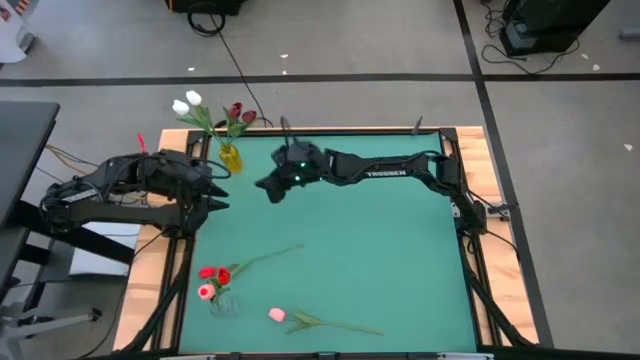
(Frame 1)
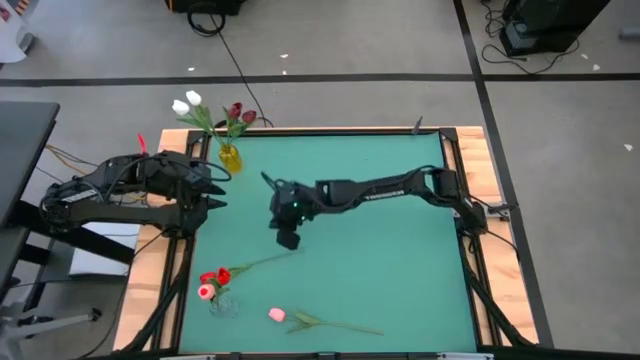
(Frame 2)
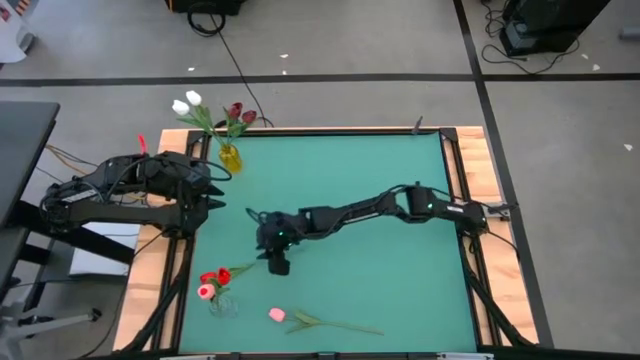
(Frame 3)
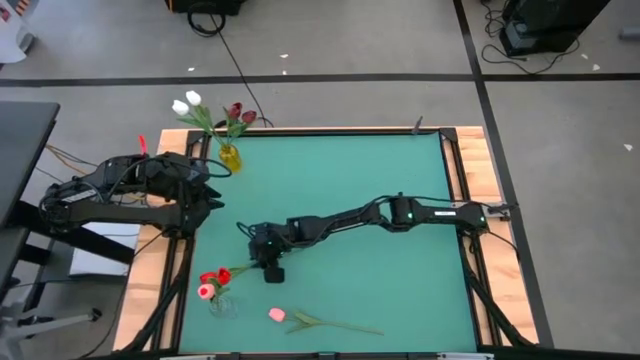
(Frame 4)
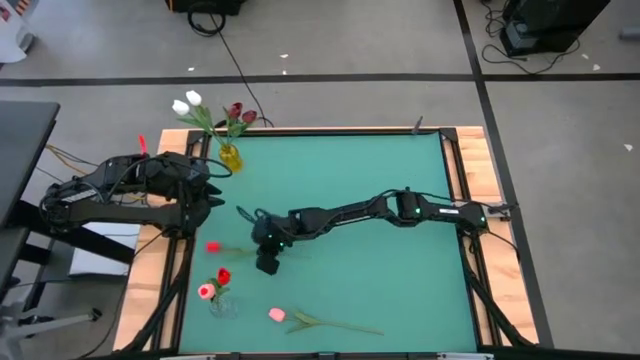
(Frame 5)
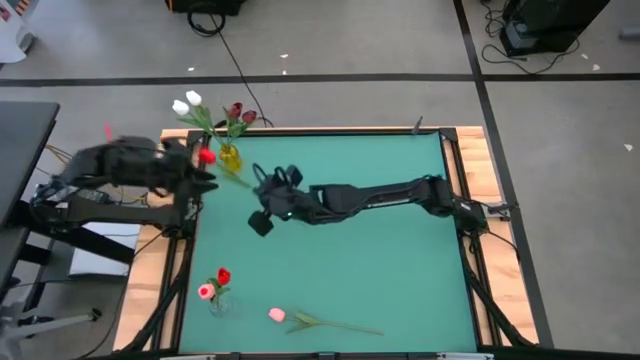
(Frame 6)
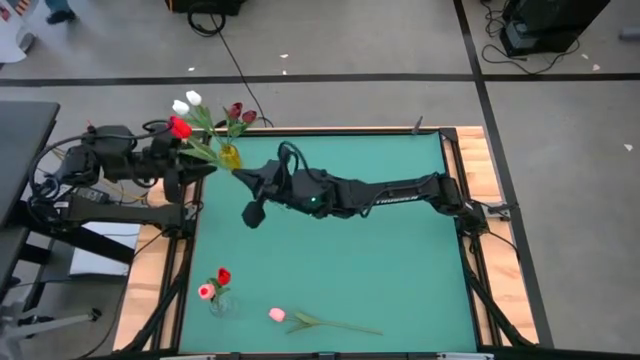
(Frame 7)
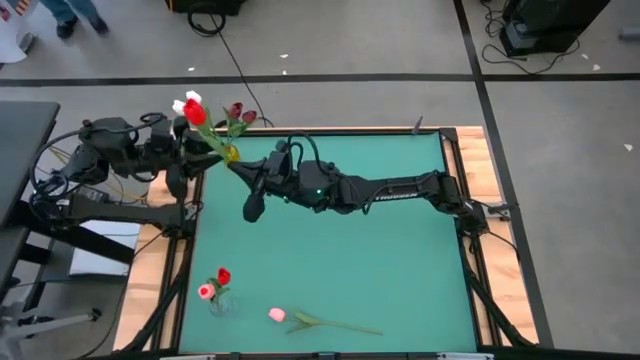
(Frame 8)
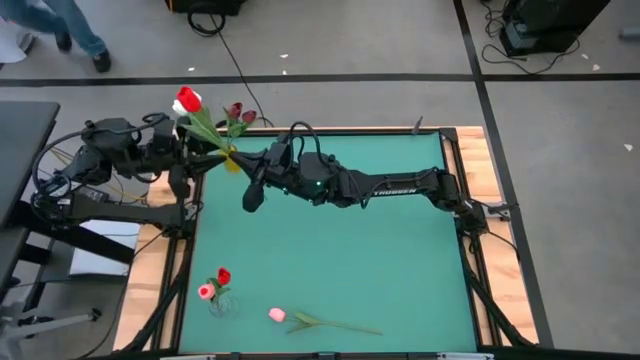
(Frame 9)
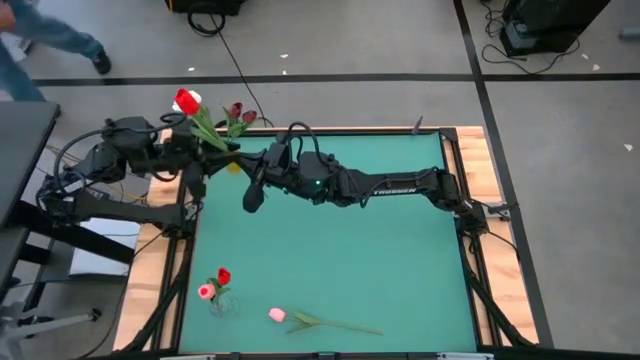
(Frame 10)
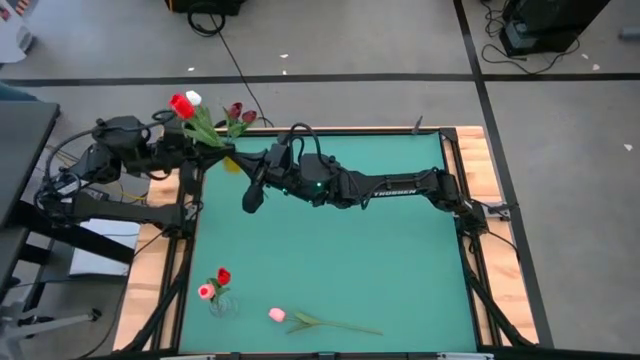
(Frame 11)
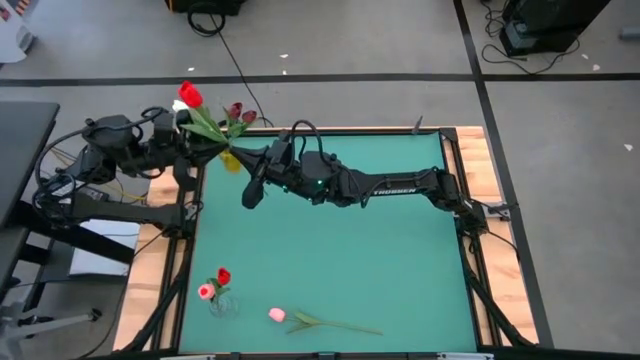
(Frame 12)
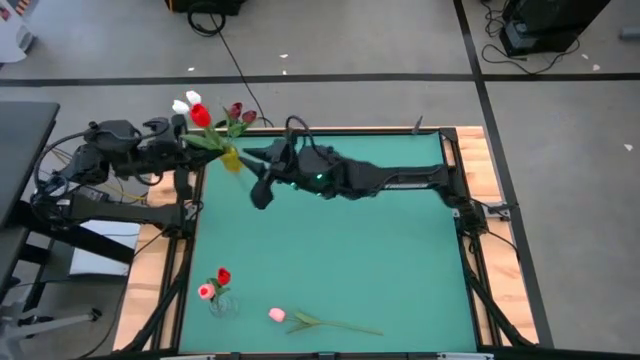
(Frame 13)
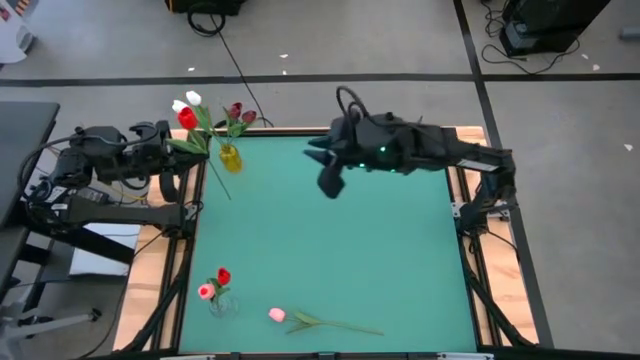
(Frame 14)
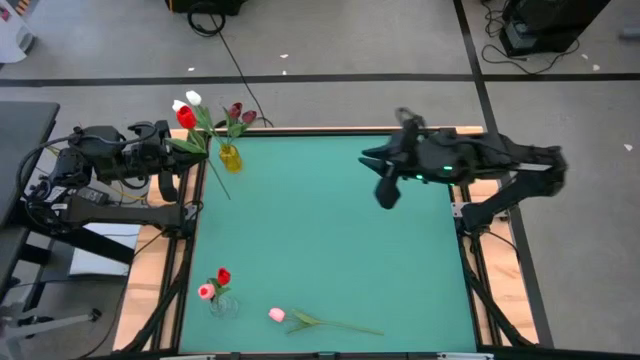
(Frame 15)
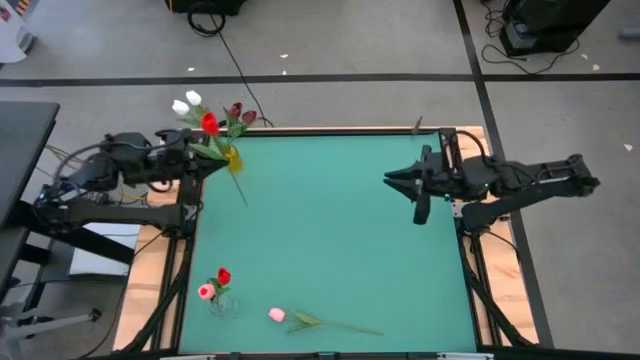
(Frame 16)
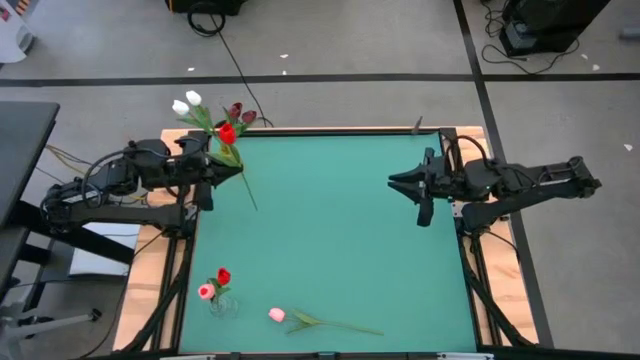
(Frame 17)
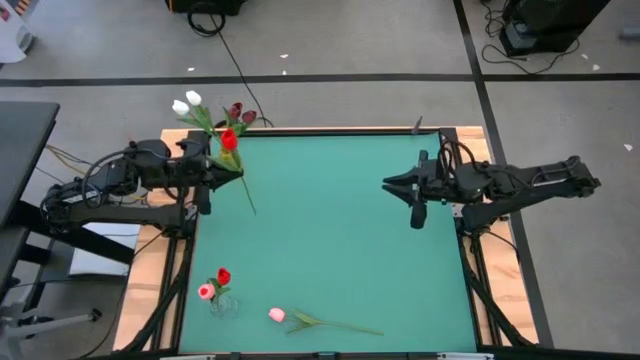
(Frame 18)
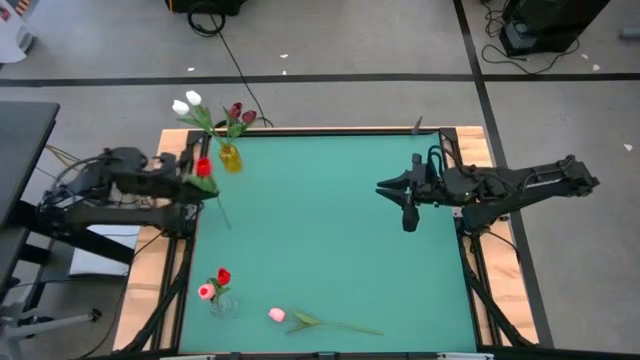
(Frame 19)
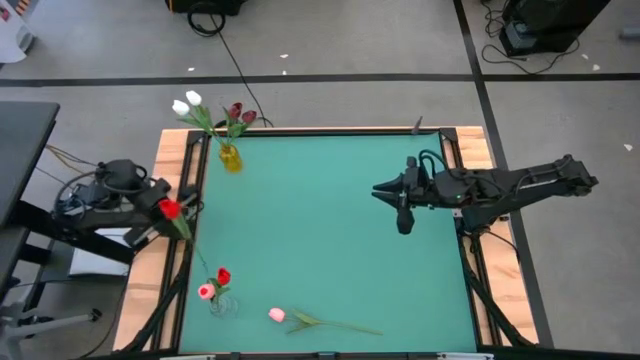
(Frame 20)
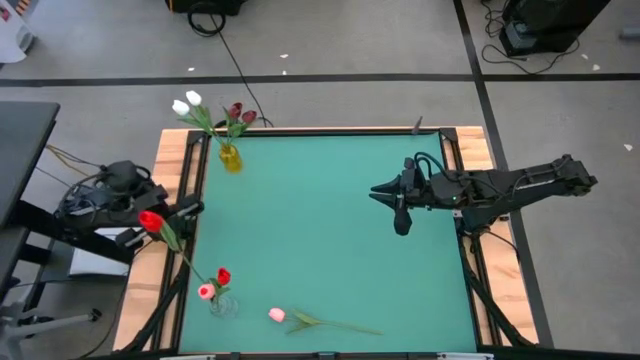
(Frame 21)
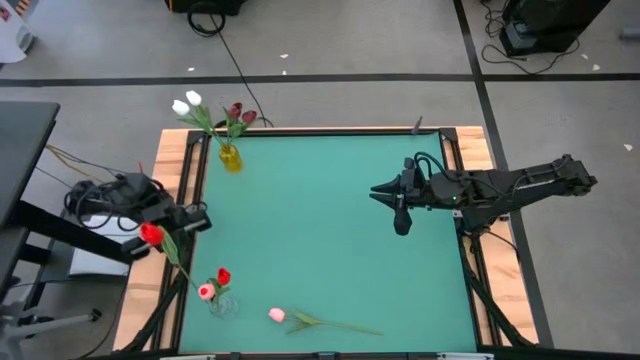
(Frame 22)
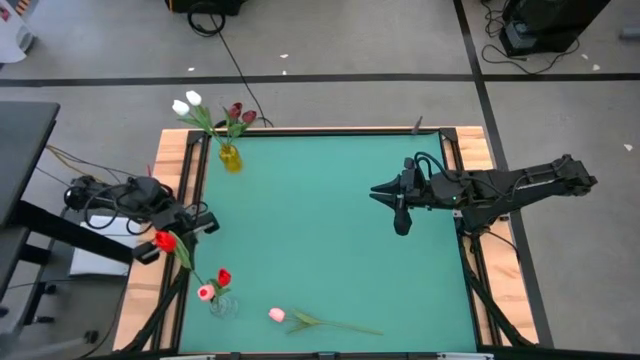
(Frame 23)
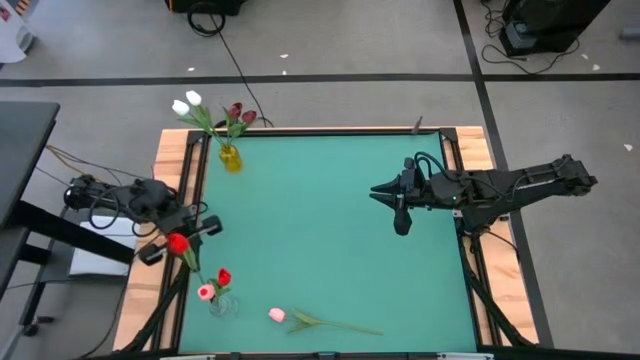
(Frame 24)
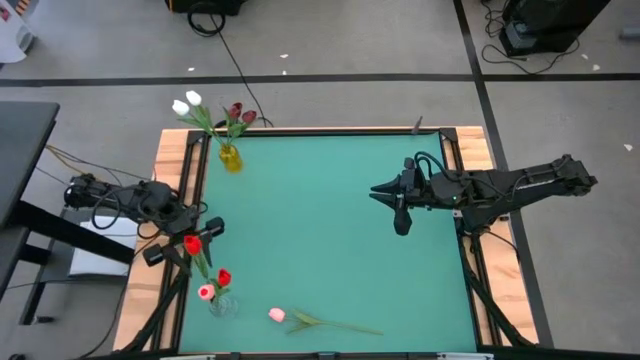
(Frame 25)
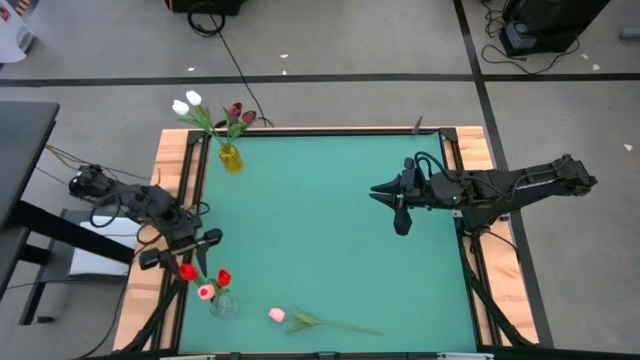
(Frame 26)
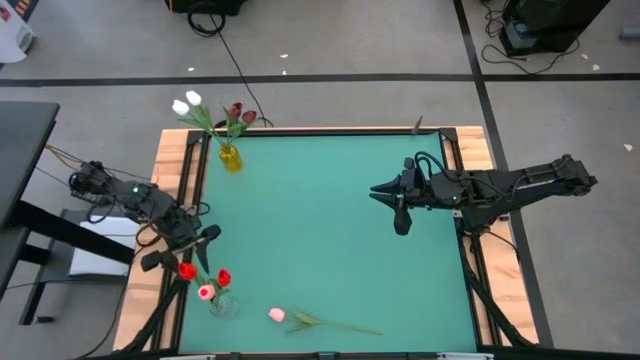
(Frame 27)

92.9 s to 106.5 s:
Task: Sort flowers into vase by color
Put the red flower into the transparent vase

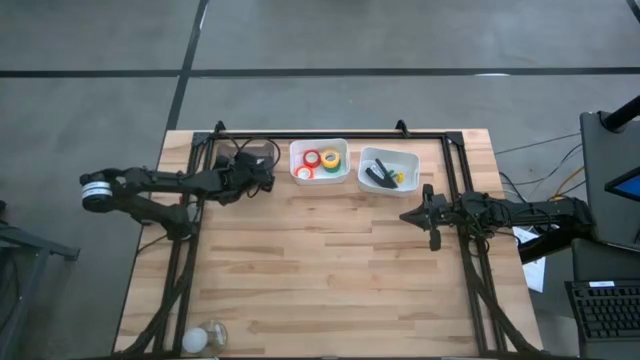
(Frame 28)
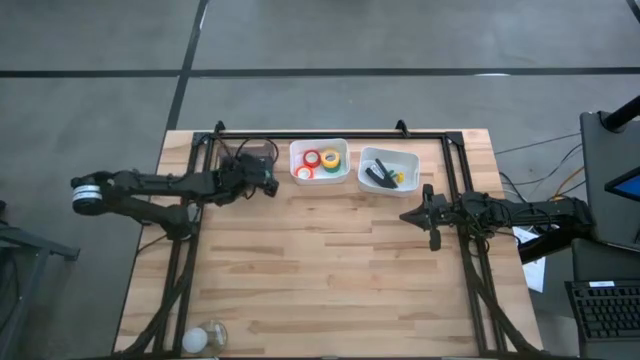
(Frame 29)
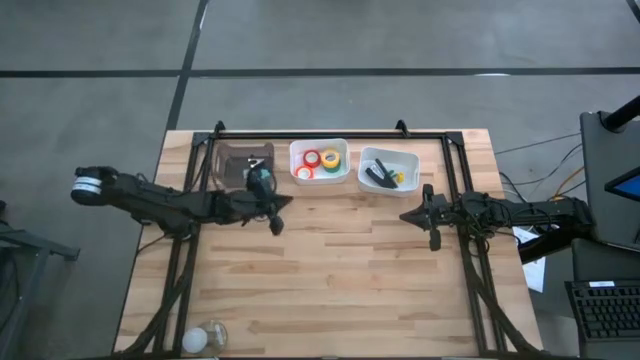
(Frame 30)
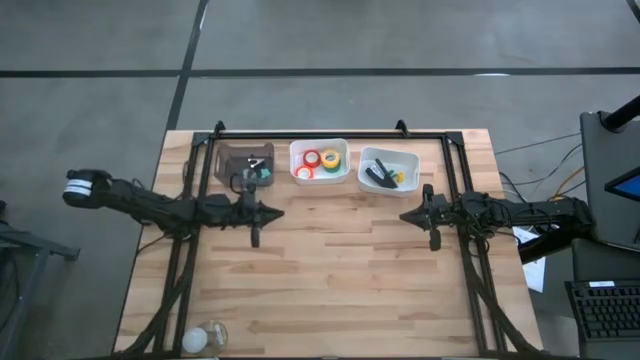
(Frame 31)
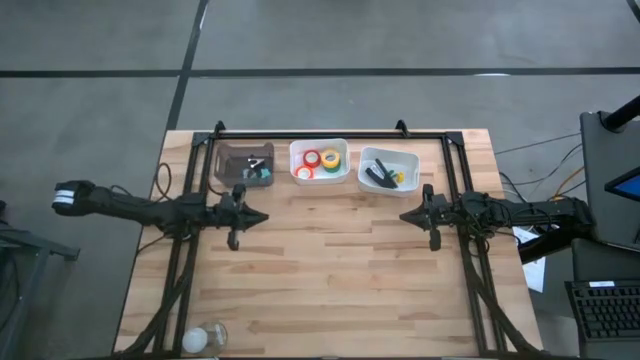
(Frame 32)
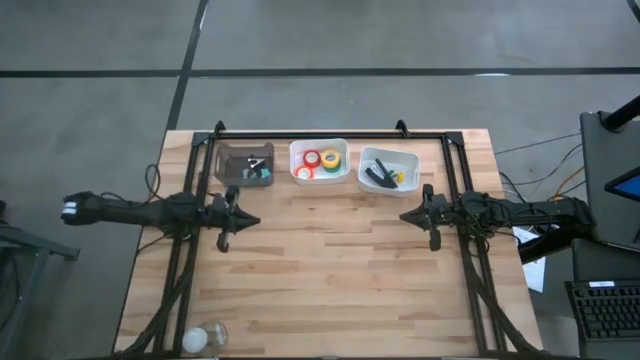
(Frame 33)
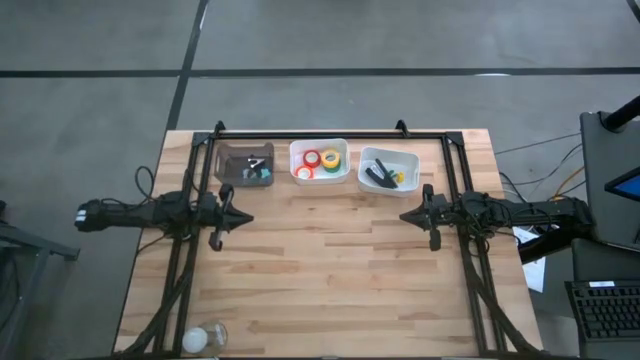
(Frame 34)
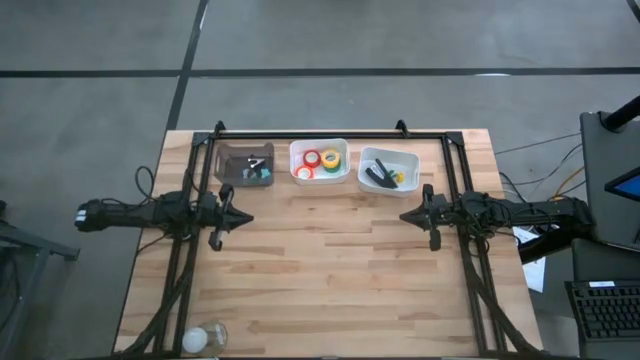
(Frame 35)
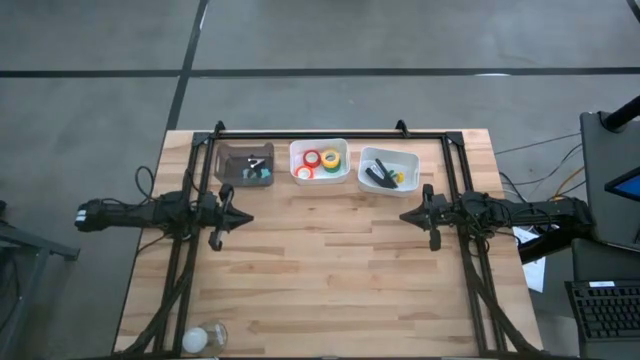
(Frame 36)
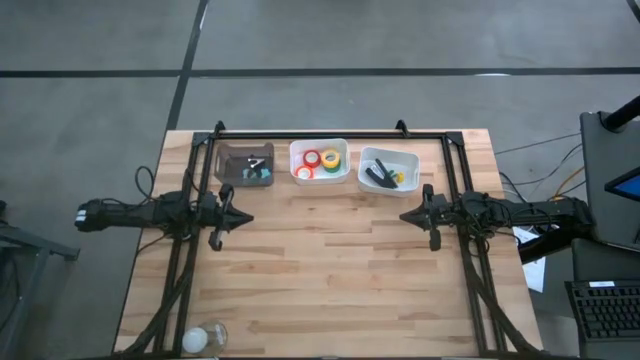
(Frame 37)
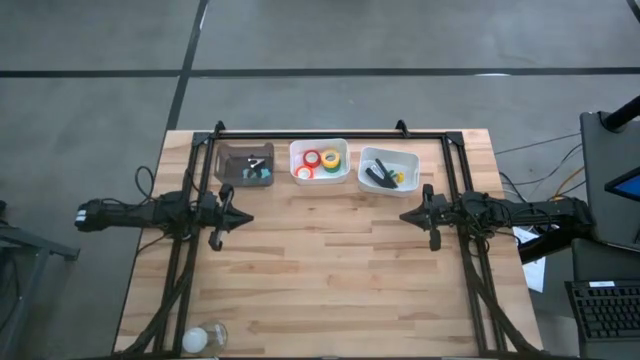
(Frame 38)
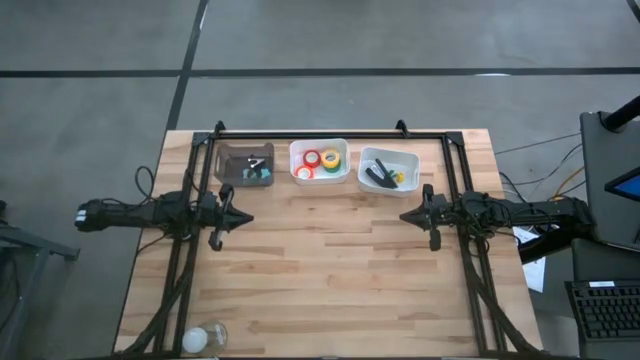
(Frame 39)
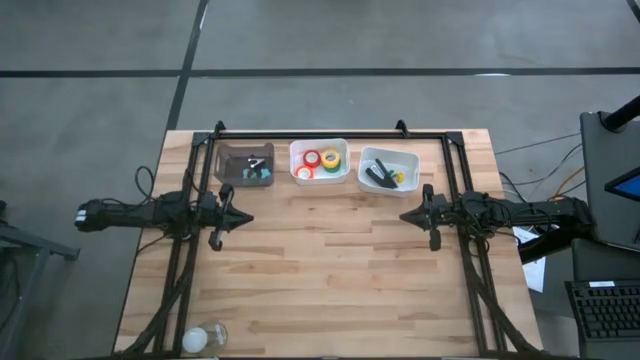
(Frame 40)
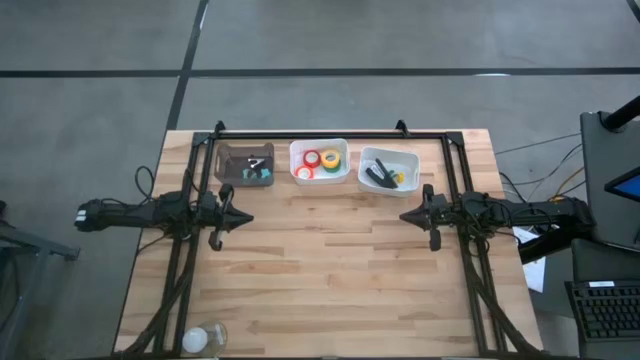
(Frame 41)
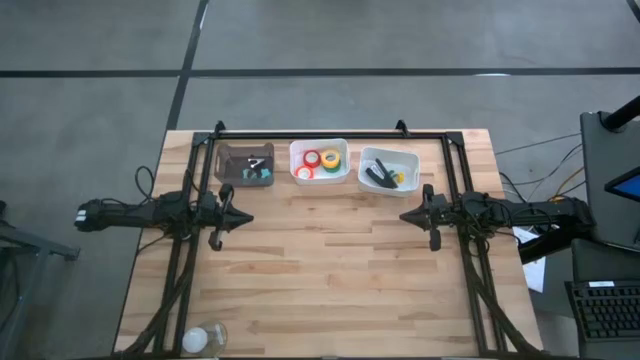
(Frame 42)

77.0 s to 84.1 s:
Task: Pick and place Stapler, Stapler remover, tape
Return to Home Position

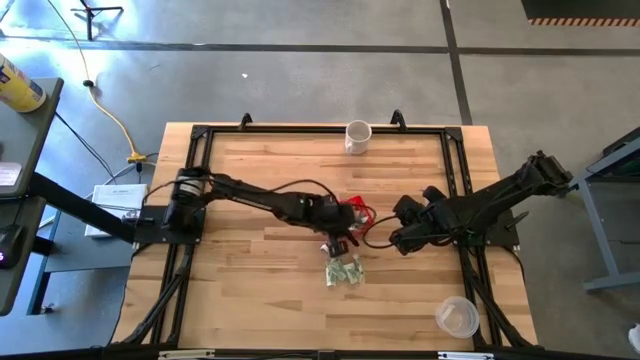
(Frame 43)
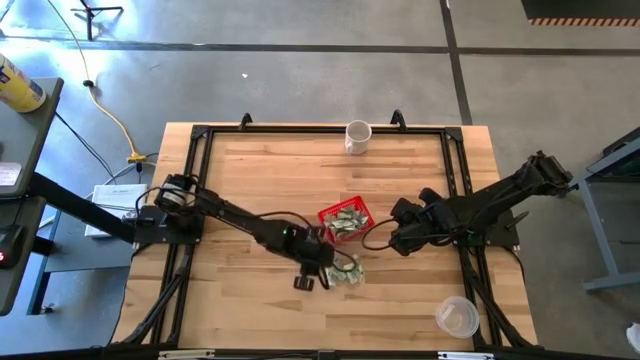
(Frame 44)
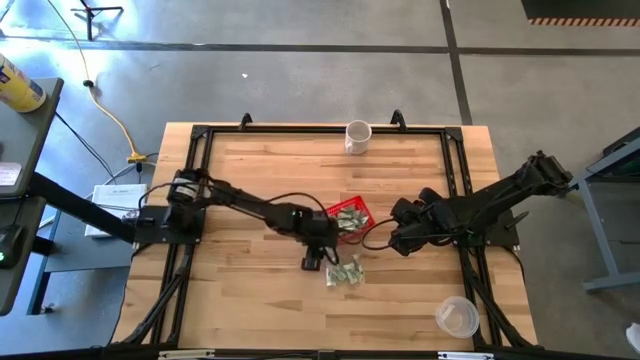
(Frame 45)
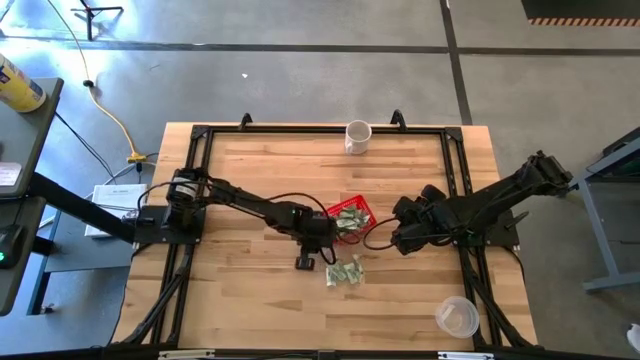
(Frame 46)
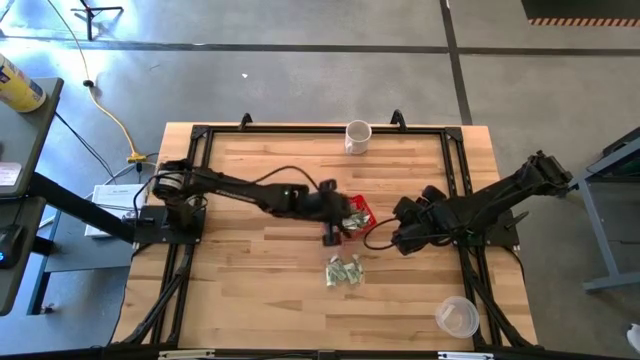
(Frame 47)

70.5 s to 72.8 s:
Task: Pick and place items into bin
Put the white stevia packet into the red bin
